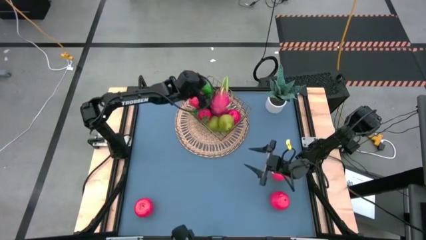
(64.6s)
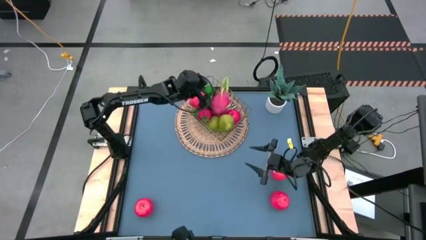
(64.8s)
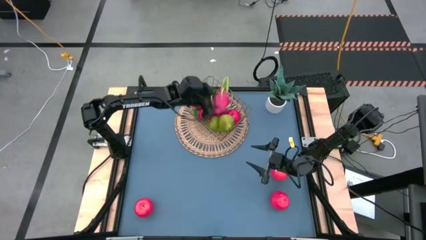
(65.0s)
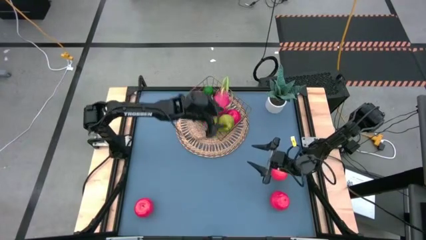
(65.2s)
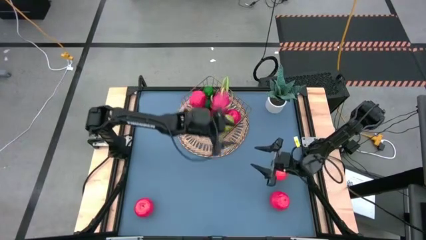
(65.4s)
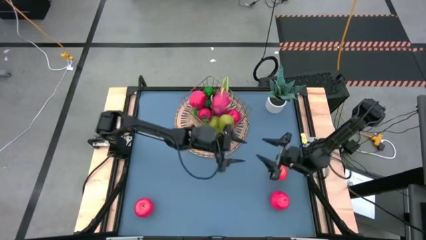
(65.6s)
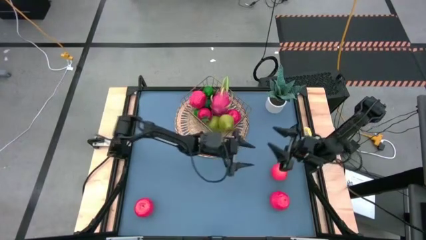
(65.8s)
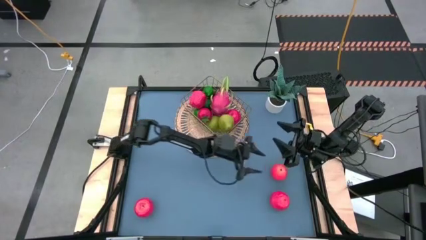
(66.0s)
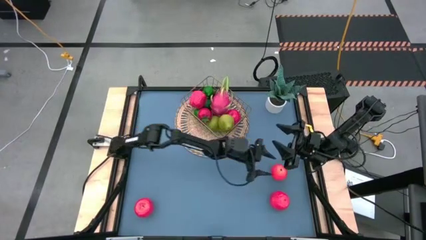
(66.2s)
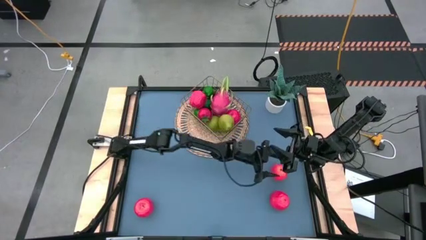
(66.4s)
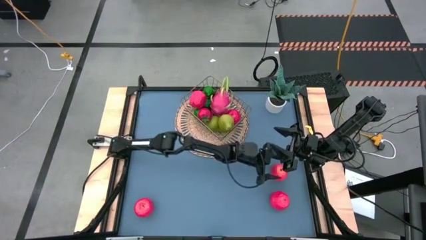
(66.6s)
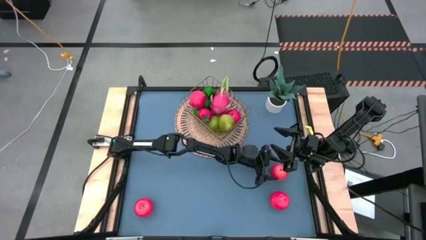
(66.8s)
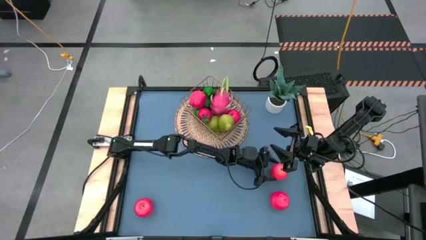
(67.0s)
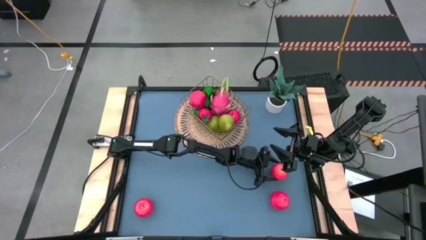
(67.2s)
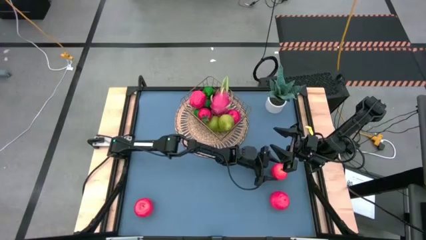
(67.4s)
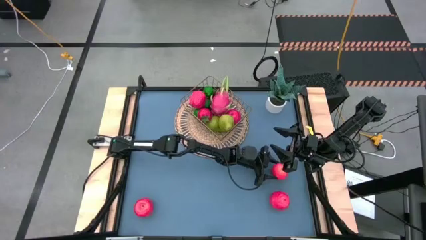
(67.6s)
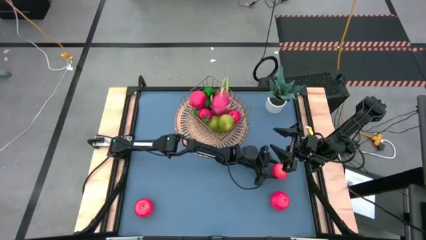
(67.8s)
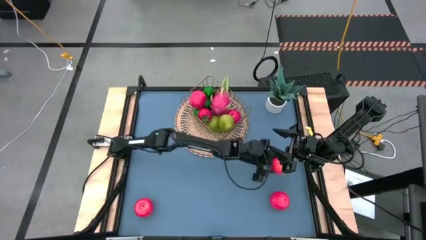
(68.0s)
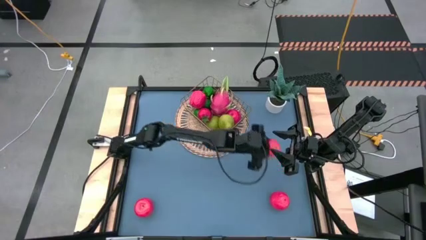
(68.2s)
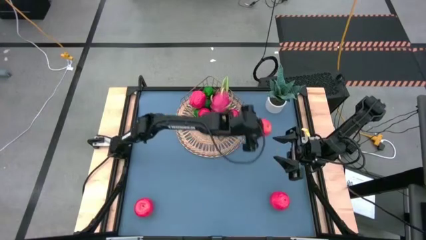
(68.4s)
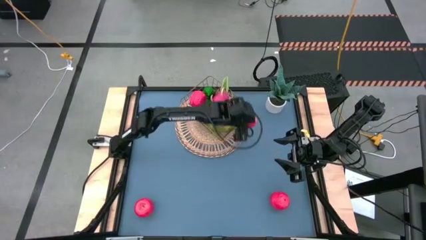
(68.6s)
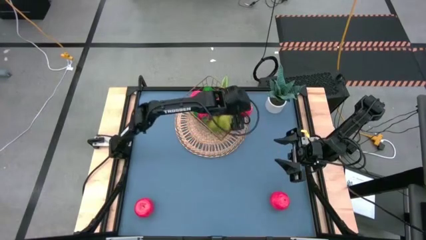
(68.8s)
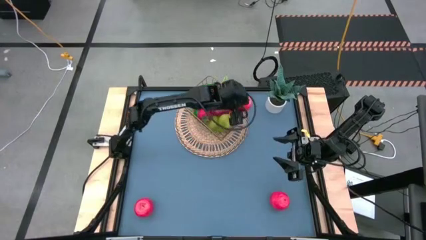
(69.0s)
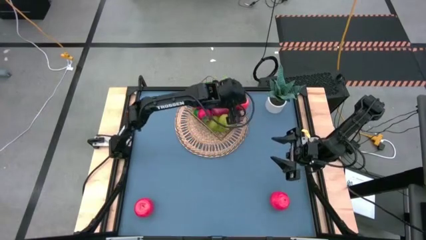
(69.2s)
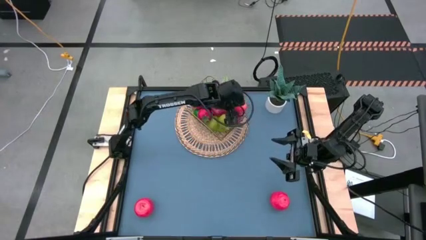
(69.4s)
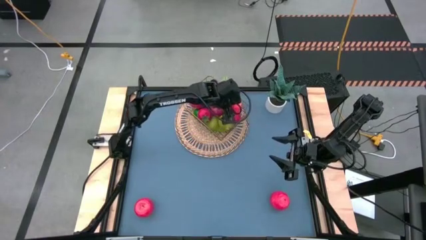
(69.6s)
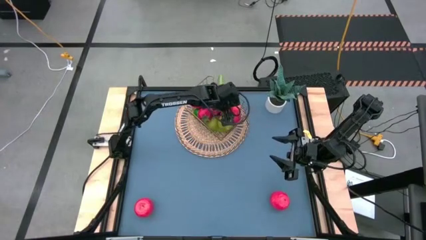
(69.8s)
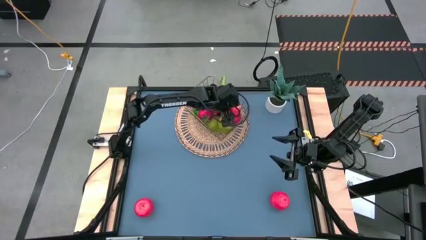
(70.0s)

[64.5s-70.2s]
Task: Build produce basket
Put the top right red apple into the gold wire basket

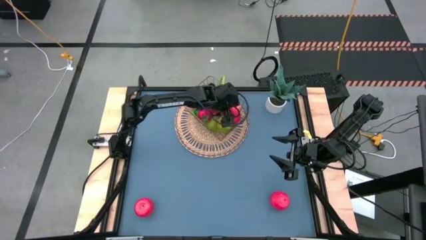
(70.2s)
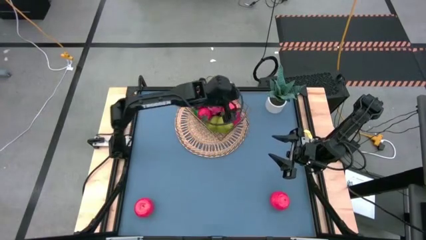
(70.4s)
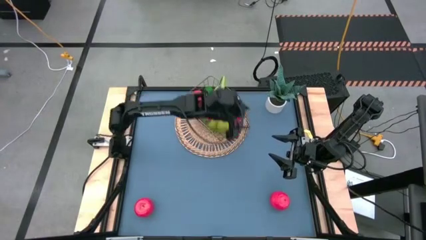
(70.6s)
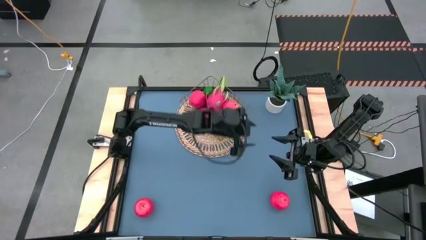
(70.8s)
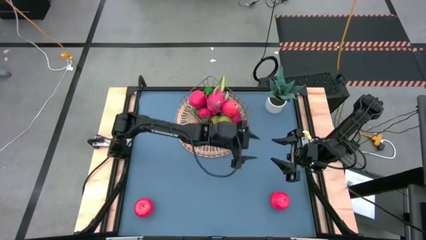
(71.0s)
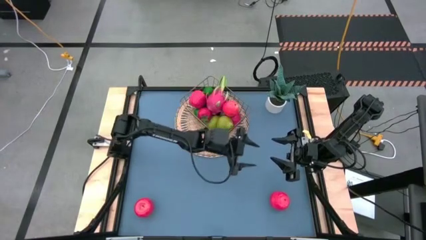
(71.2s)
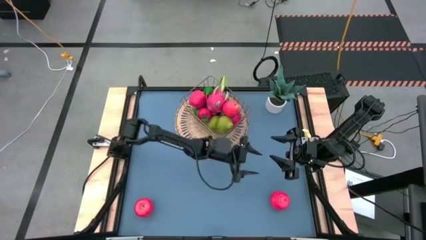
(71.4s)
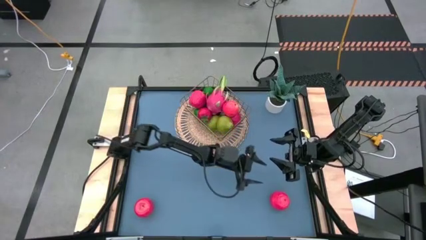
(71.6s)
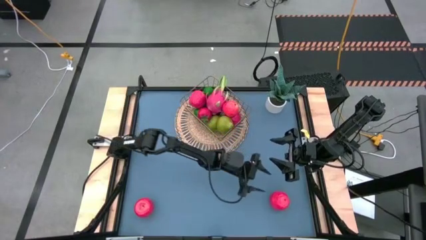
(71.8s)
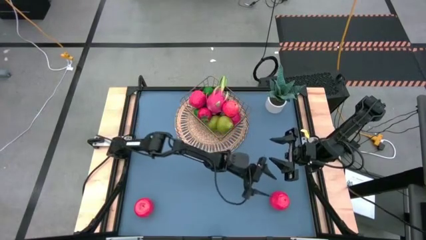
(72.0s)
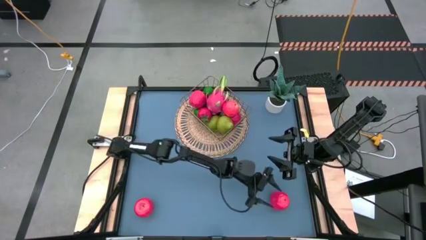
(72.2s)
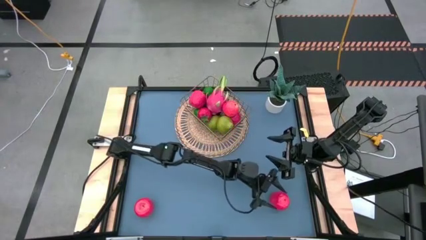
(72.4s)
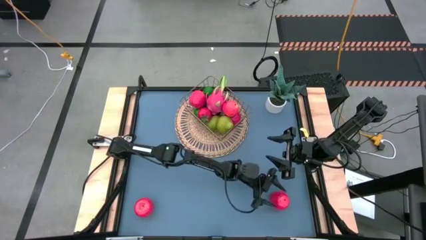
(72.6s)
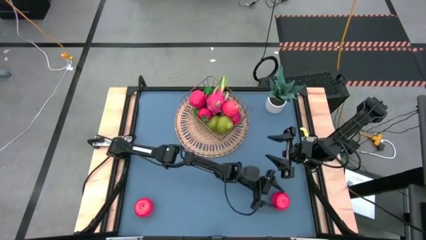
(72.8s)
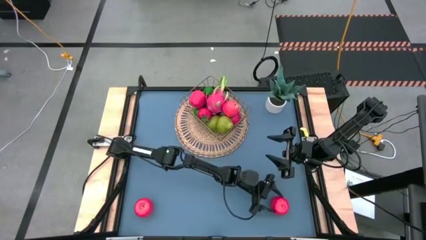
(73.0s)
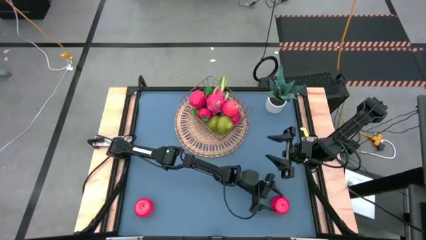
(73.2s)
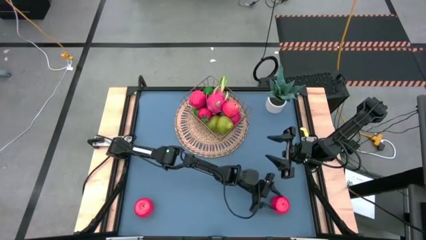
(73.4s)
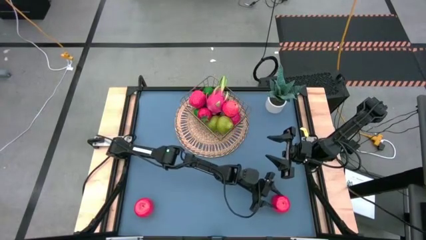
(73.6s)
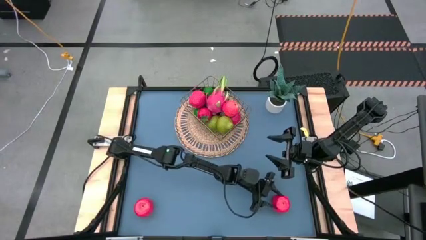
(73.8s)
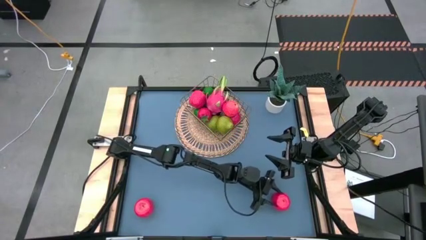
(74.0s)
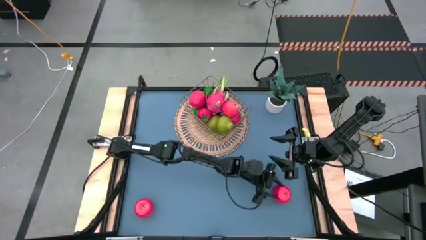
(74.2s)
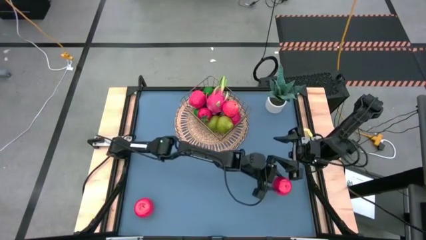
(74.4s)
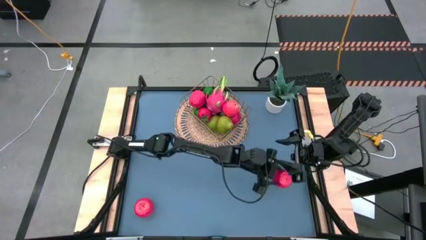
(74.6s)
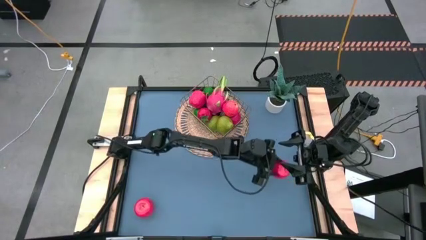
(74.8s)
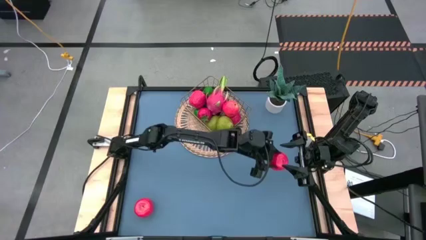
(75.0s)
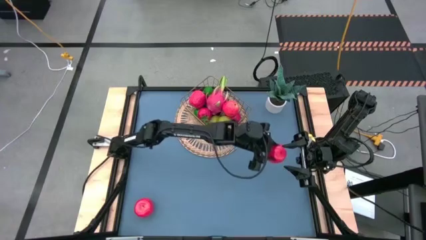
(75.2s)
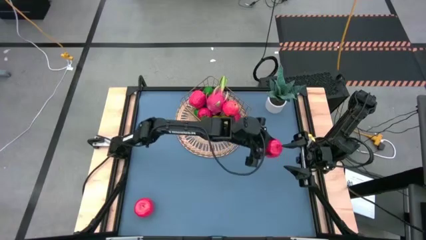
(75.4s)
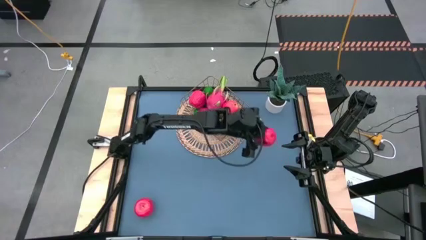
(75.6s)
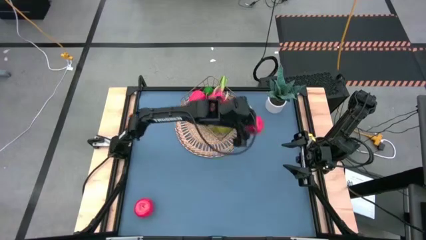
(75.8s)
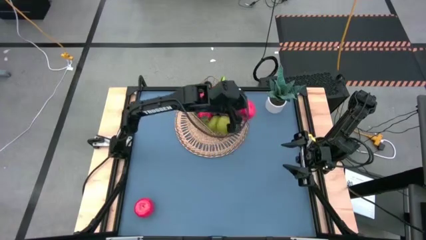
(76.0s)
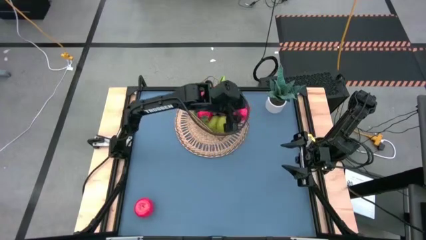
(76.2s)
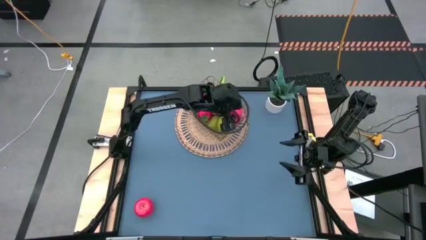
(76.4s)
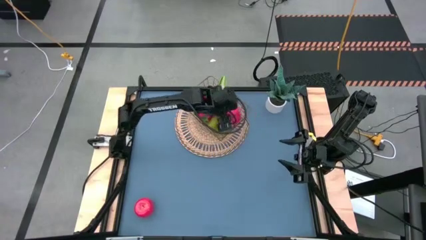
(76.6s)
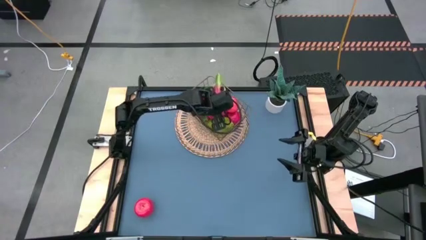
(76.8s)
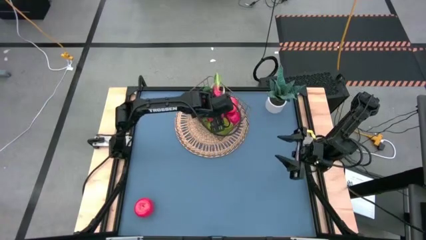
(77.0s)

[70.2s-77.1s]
Put the right red apple into the gold wire basket

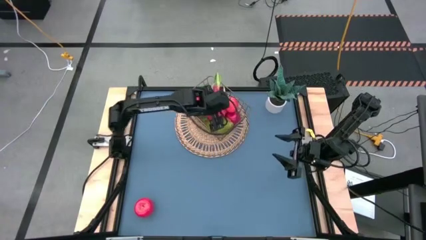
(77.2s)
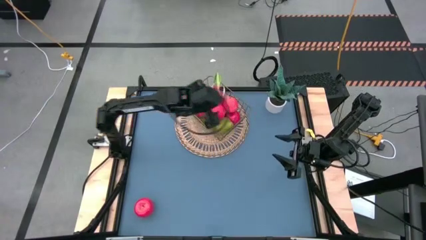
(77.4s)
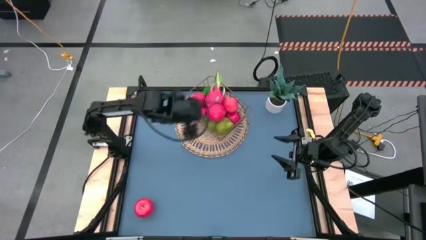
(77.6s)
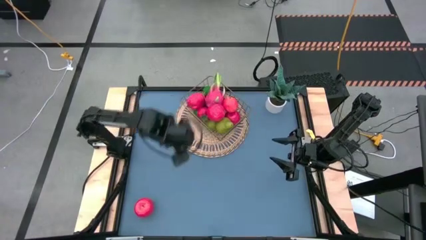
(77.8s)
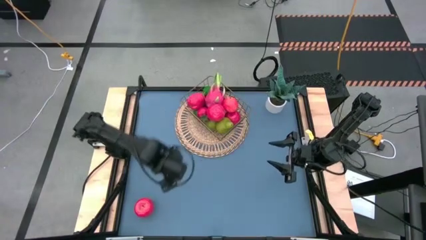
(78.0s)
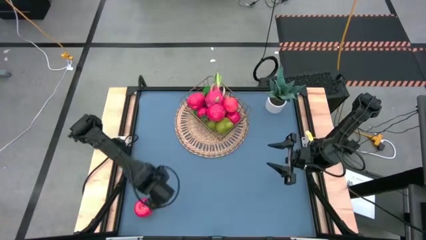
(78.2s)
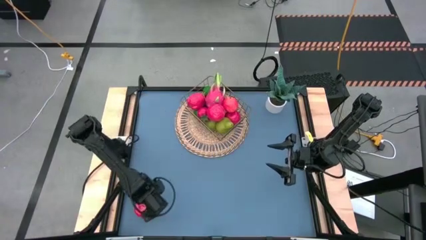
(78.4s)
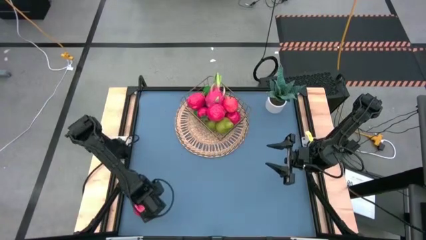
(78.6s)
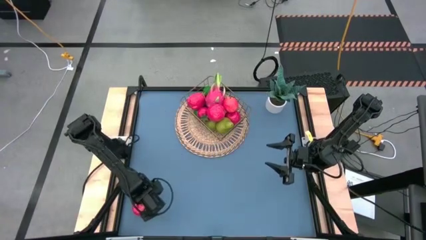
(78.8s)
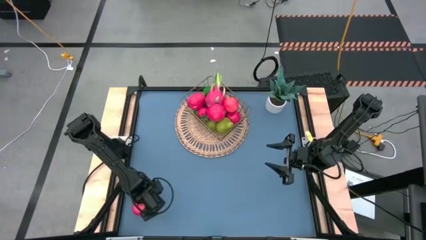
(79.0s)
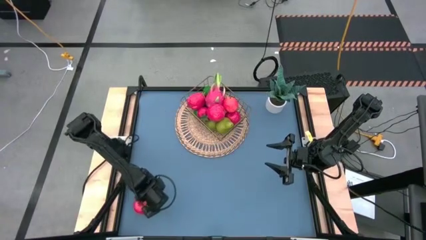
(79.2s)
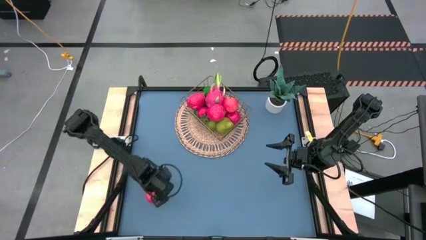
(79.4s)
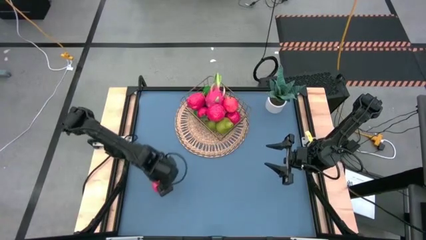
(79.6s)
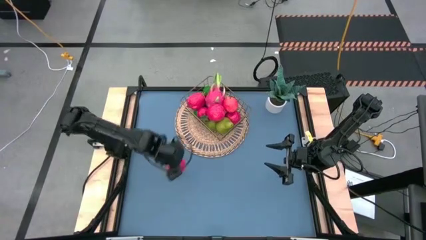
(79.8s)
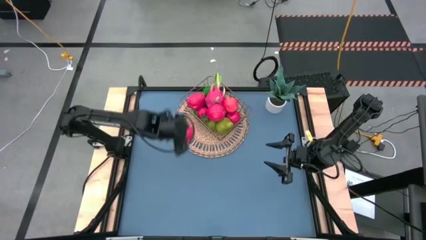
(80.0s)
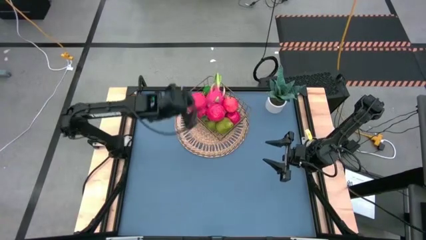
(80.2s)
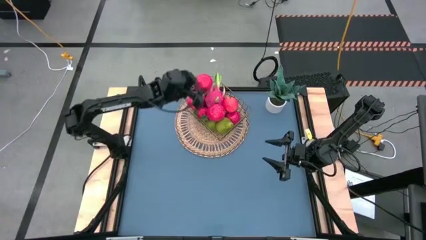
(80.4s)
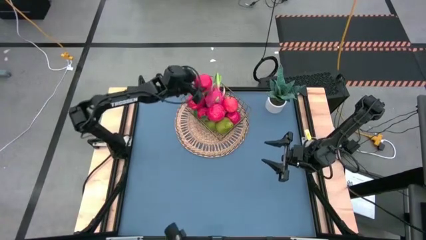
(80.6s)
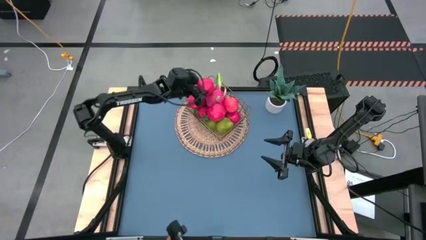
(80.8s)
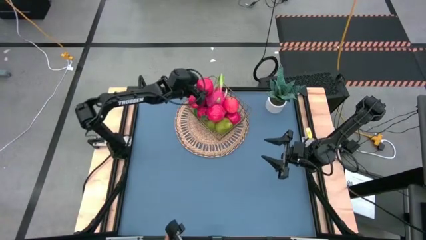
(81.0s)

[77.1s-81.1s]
Put the red apple into the gold wire basket
